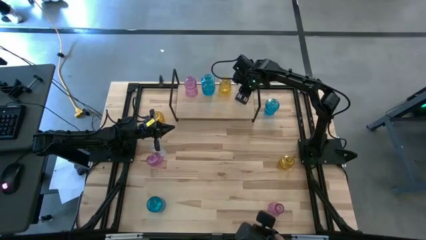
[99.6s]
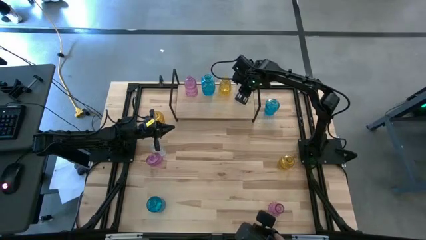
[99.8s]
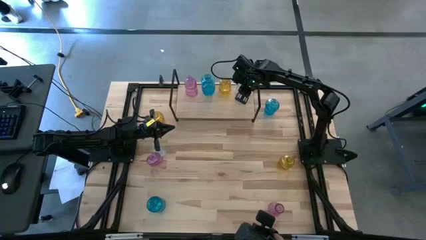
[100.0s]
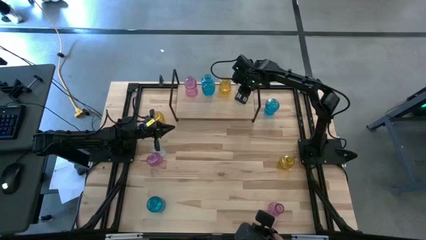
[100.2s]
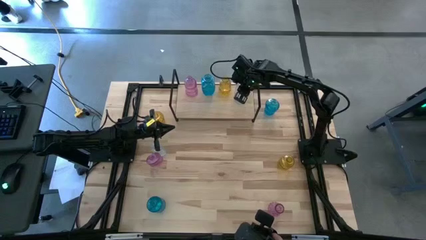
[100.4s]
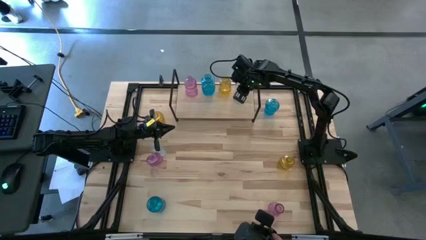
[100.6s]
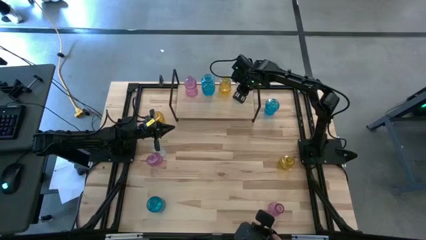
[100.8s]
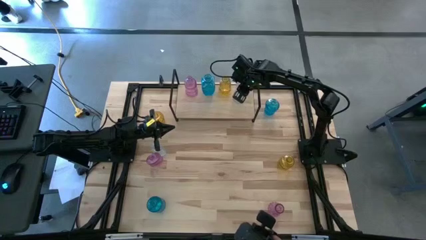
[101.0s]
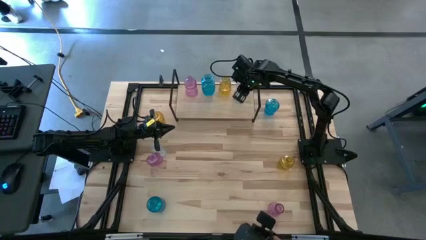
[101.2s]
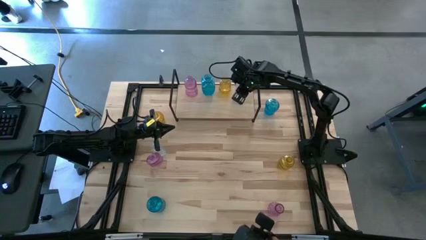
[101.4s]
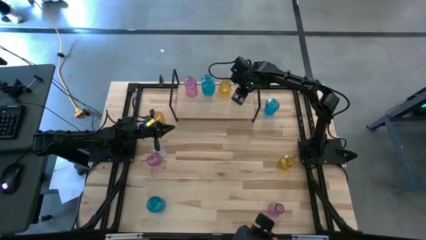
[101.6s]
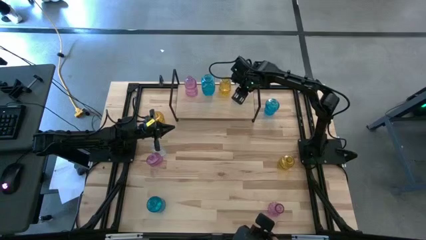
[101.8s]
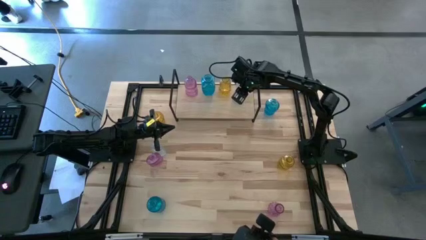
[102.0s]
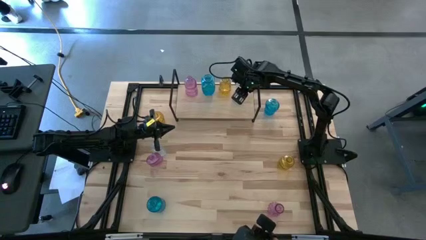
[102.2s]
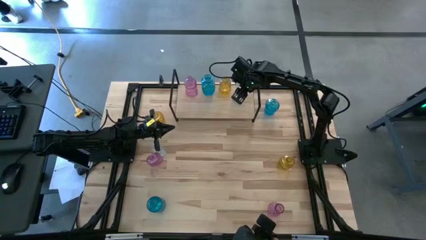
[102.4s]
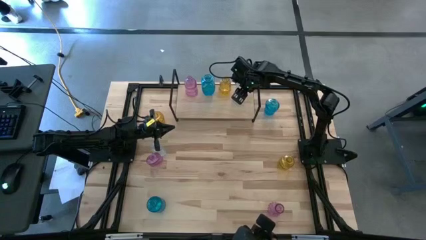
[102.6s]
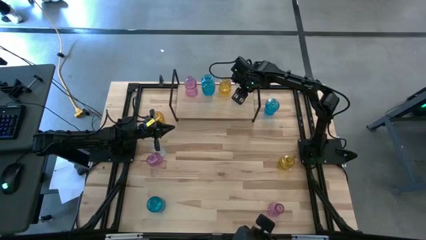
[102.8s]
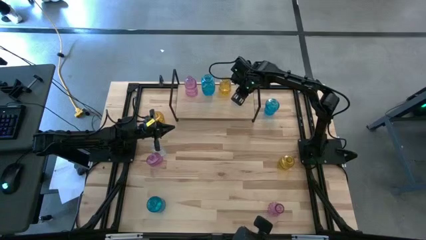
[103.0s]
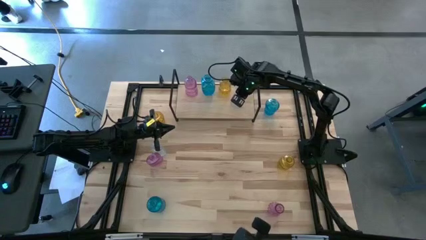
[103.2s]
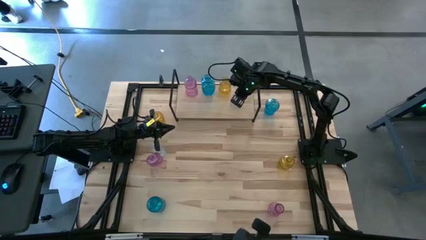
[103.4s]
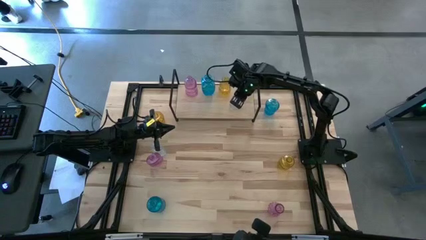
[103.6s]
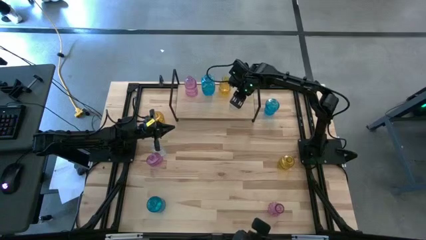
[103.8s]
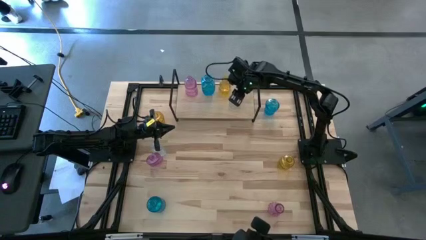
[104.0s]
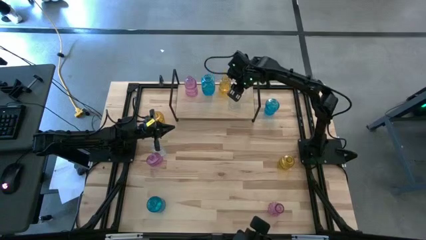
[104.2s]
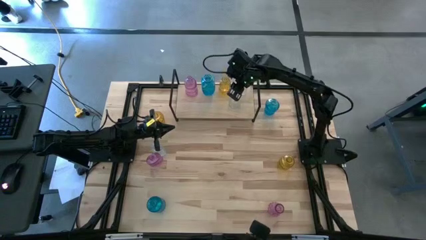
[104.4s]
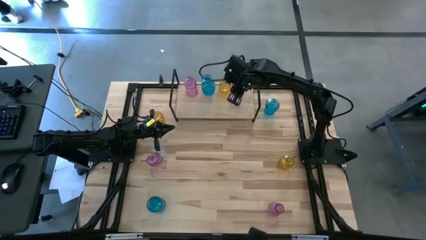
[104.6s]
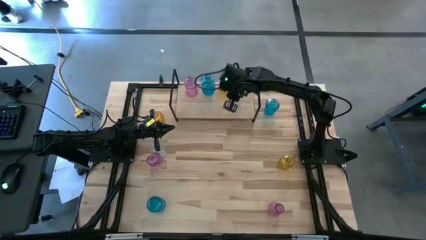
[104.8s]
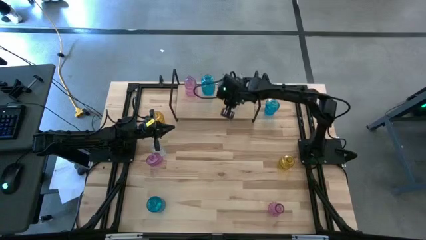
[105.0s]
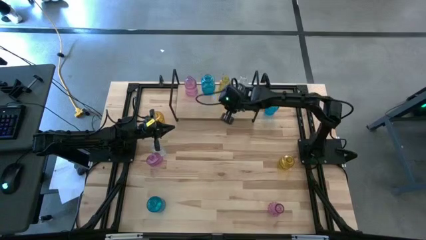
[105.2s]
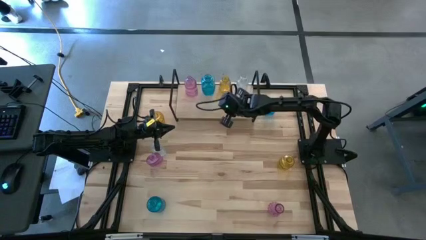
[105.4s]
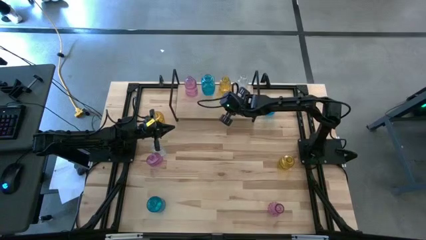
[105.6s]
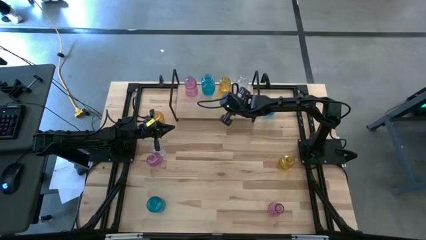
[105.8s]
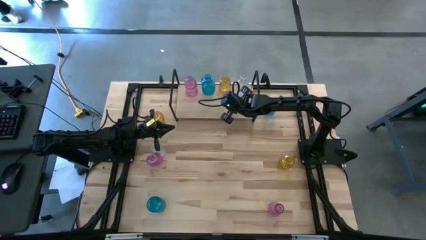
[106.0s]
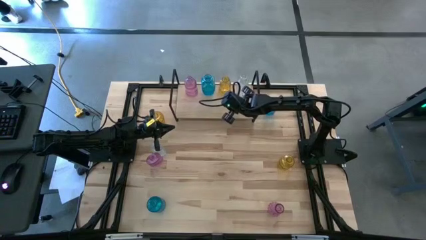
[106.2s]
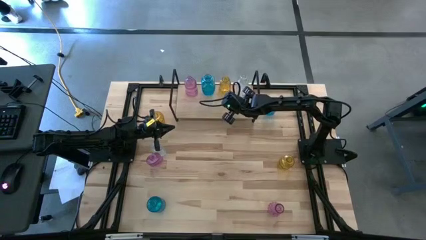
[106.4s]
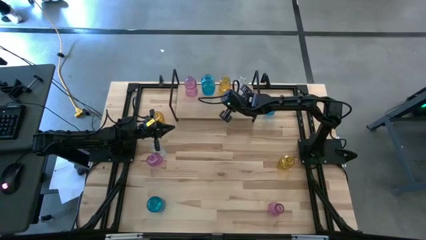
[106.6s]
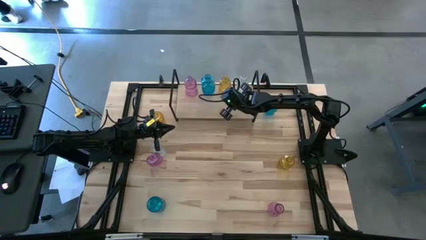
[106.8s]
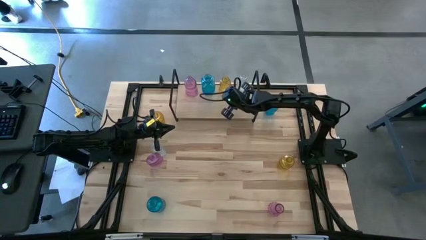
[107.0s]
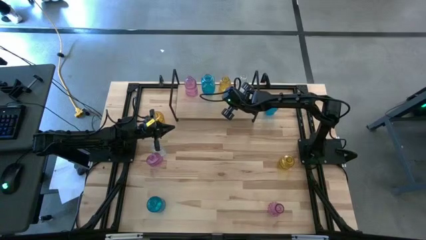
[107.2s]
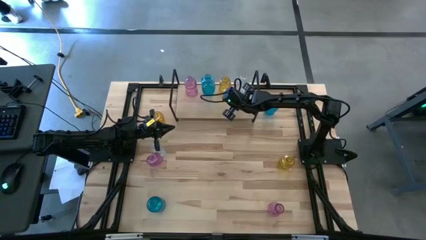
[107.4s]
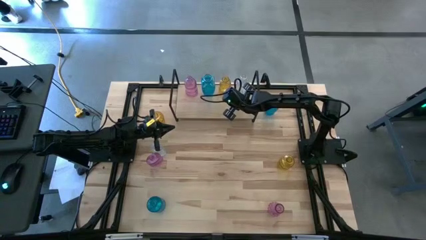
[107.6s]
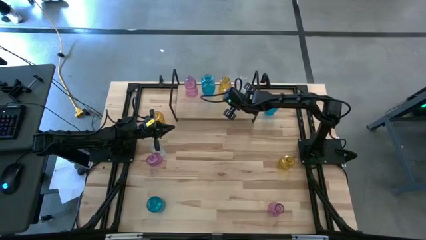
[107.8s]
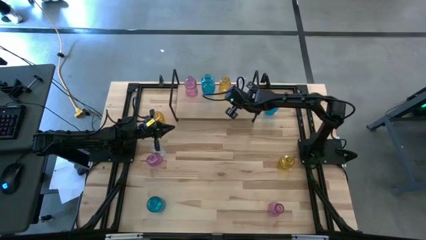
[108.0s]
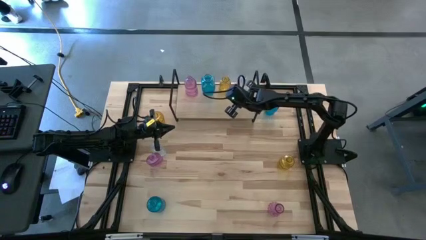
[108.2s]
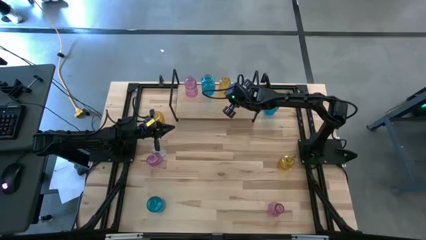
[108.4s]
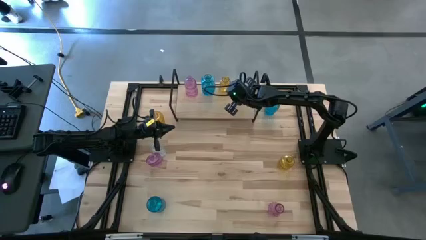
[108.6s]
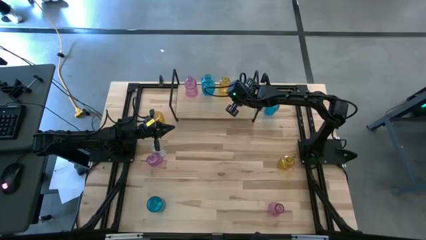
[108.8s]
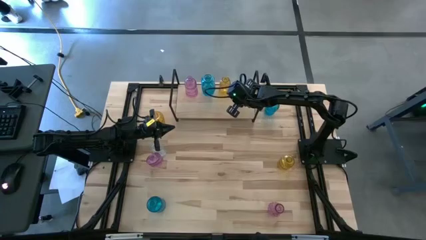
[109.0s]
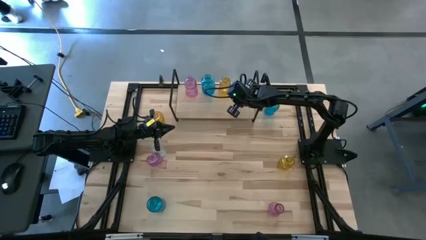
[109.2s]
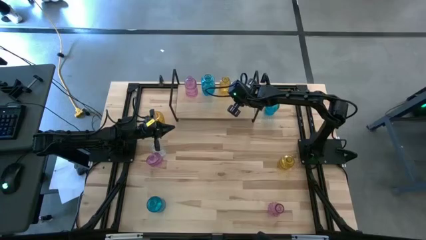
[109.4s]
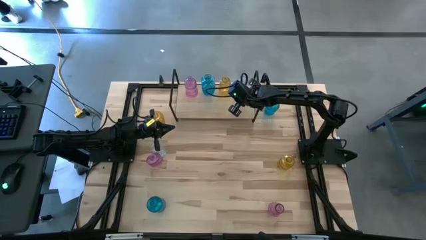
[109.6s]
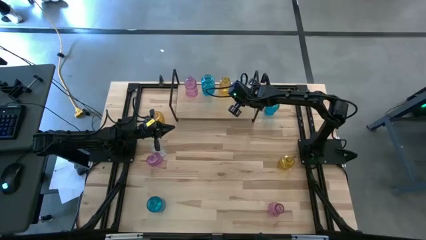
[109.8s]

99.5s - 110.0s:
Task: sort vases onto shelf
Put the right transparent vase on the shelf aligned with the transparent vase

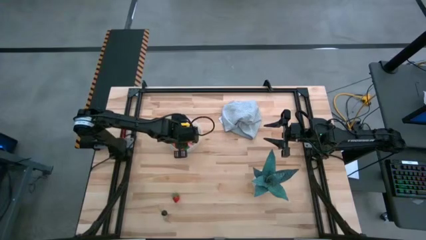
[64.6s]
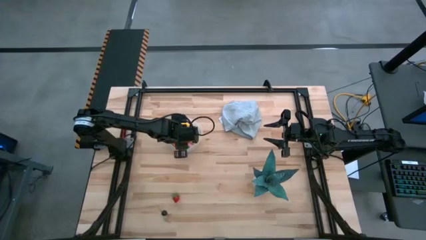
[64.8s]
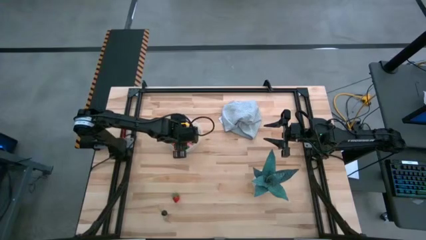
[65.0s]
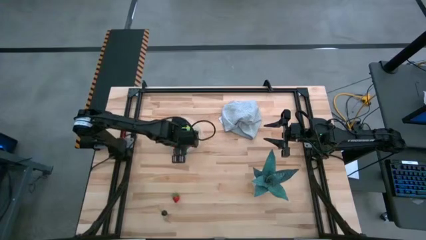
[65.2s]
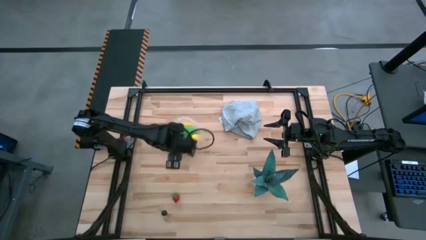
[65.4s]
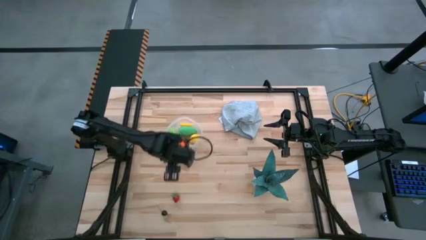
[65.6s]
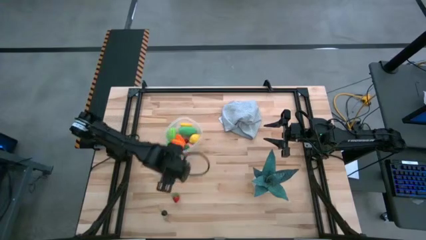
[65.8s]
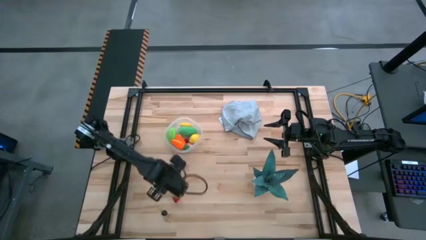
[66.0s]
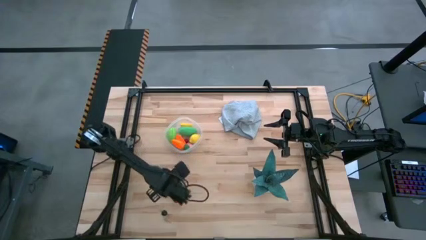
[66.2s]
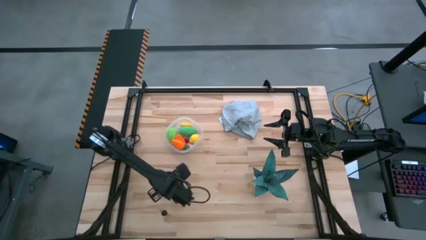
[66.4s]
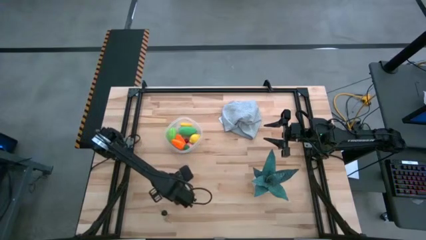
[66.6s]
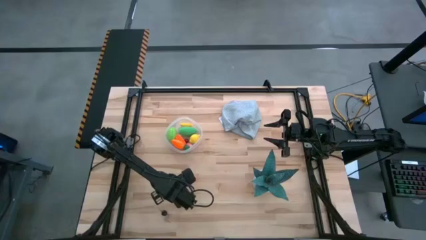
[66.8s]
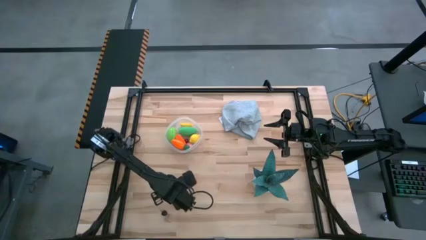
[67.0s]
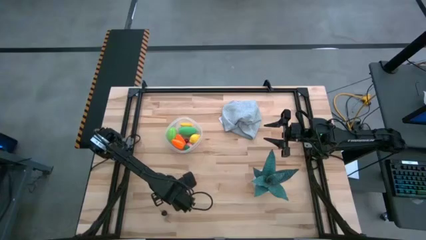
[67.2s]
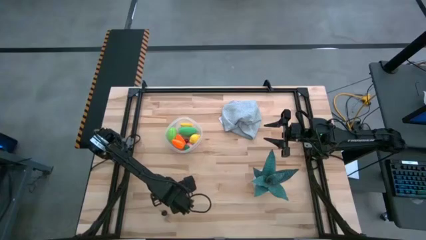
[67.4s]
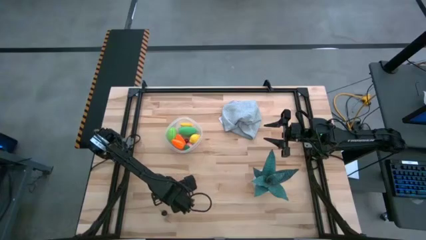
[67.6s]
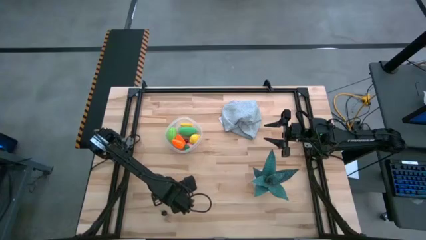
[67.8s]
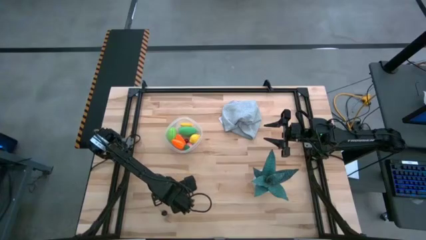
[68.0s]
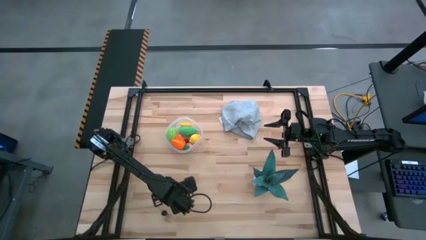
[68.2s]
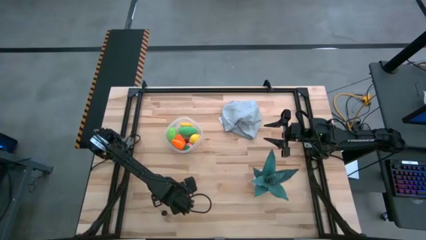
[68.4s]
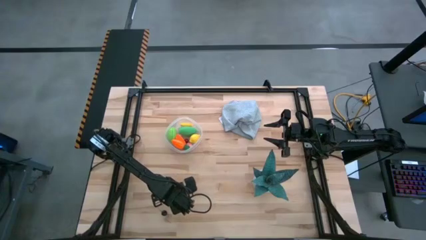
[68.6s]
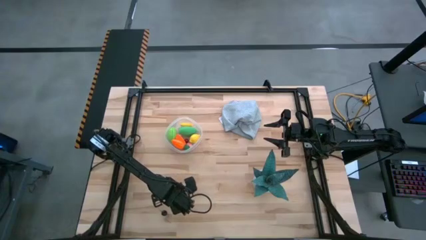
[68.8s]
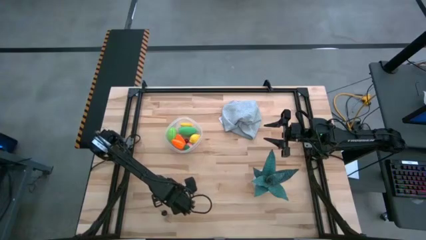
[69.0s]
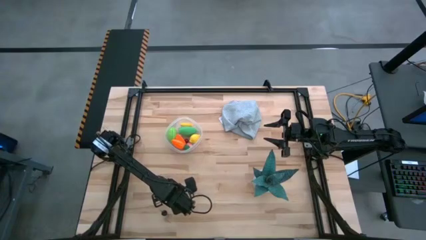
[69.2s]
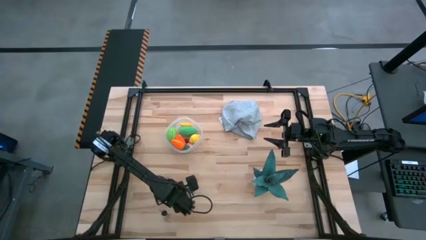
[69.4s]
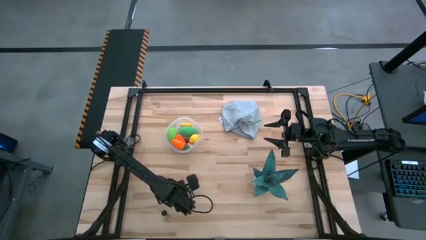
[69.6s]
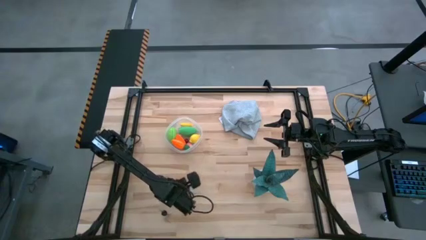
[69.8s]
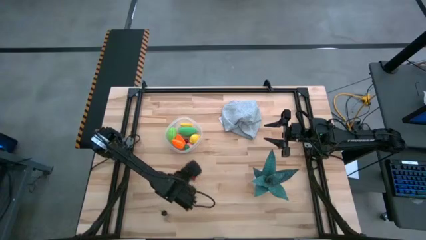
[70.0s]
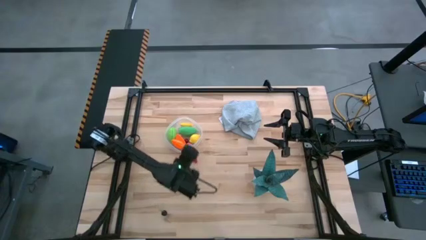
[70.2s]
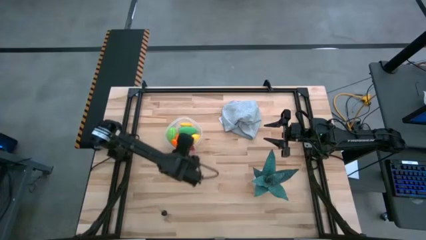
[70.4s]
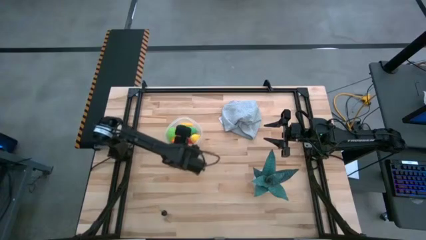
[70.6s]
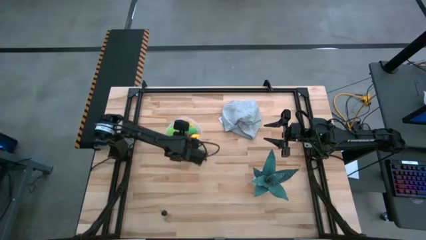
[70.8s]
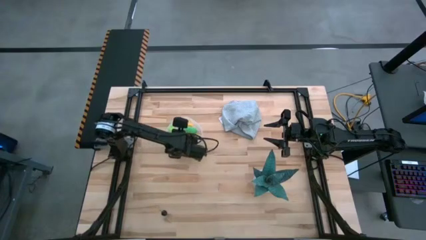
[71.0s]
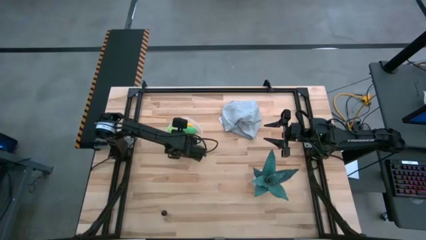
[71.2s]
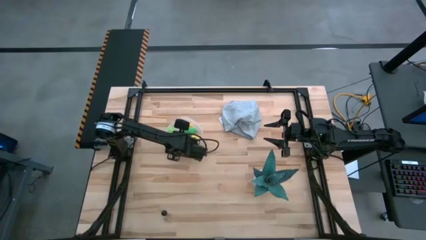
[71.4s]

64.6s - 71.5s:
Task: Pick and placing Produce into tupperware
Put the red strawberry into the transparent container
